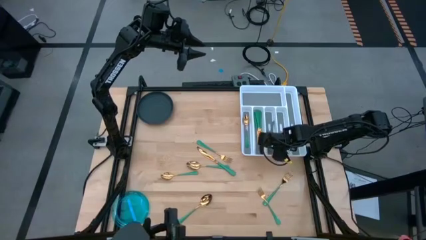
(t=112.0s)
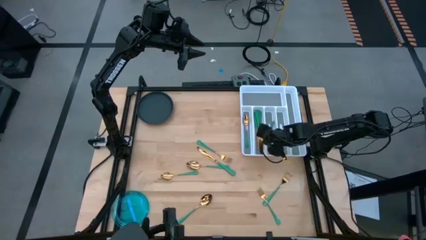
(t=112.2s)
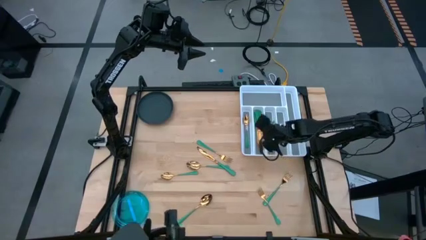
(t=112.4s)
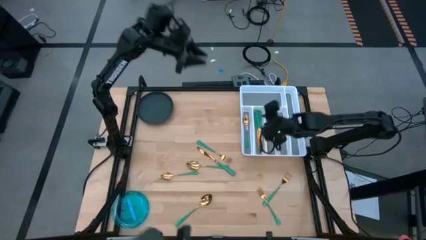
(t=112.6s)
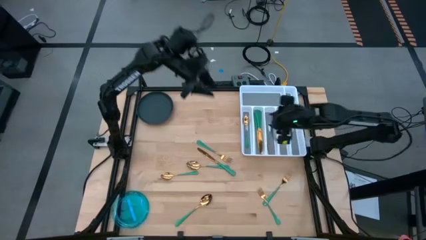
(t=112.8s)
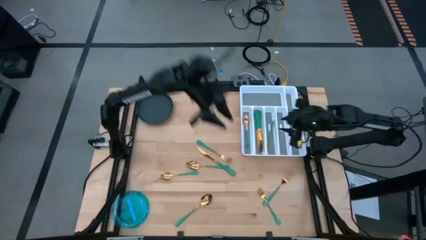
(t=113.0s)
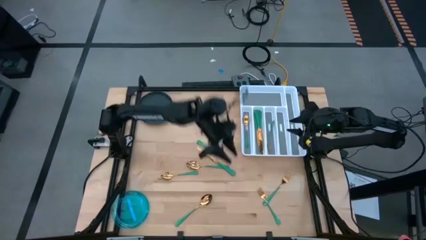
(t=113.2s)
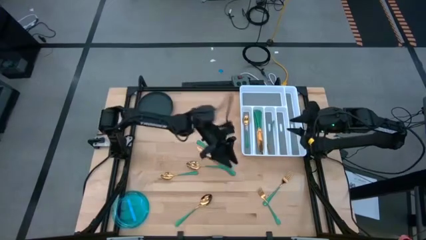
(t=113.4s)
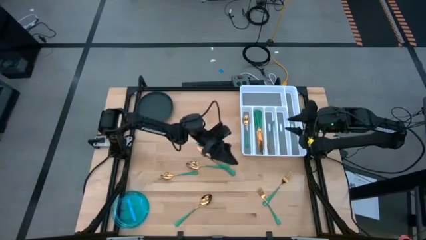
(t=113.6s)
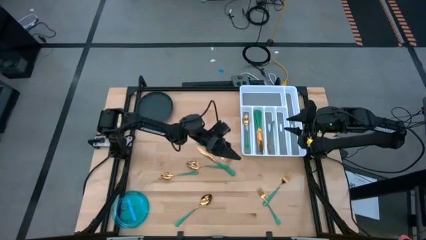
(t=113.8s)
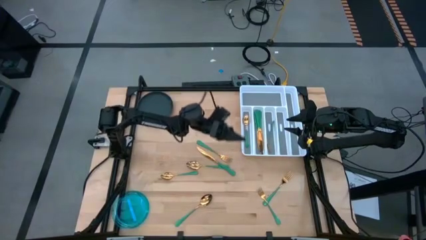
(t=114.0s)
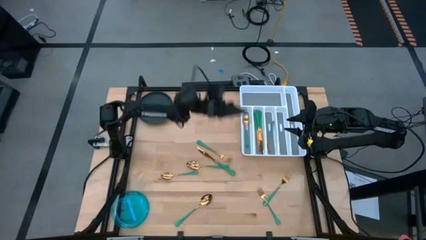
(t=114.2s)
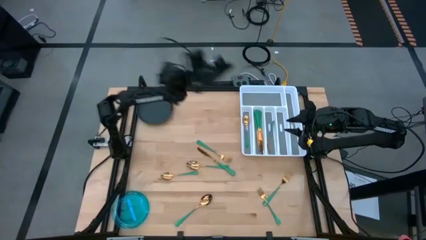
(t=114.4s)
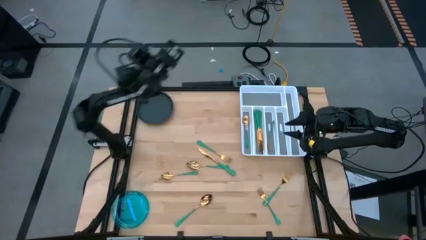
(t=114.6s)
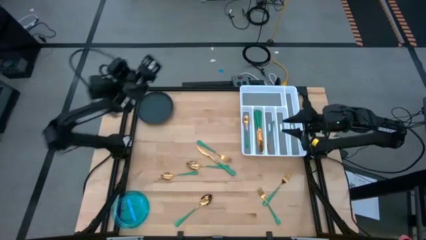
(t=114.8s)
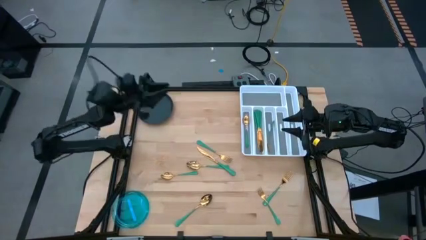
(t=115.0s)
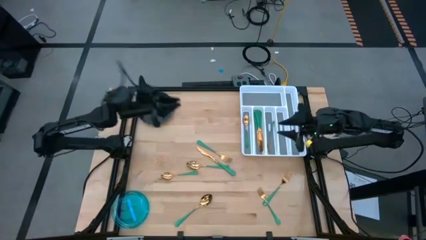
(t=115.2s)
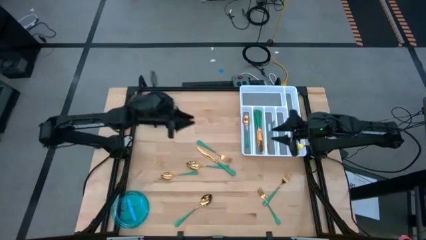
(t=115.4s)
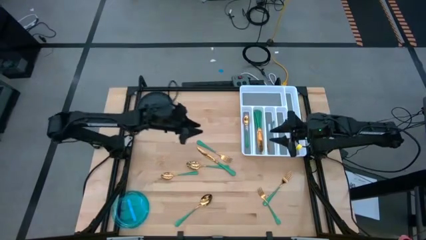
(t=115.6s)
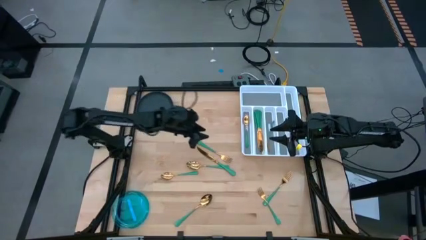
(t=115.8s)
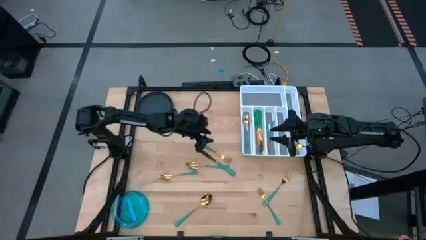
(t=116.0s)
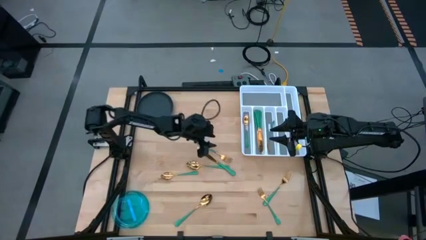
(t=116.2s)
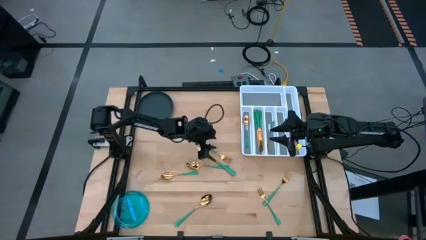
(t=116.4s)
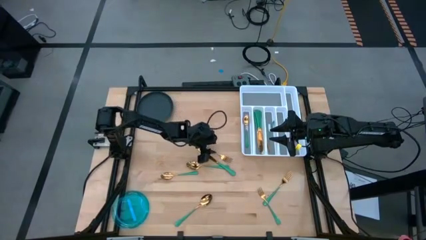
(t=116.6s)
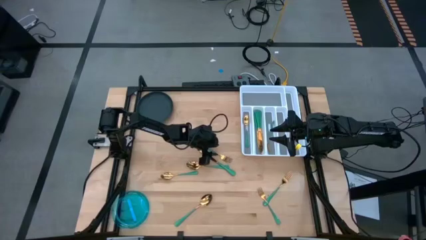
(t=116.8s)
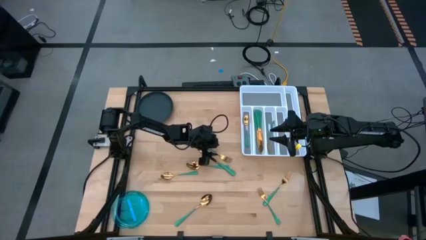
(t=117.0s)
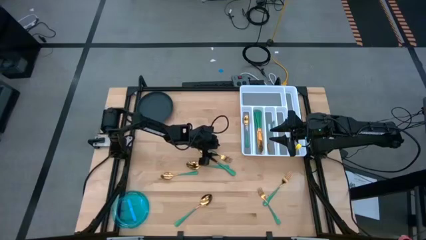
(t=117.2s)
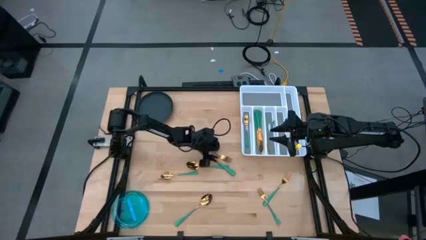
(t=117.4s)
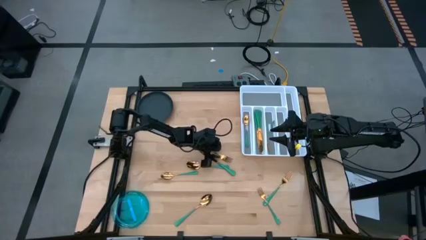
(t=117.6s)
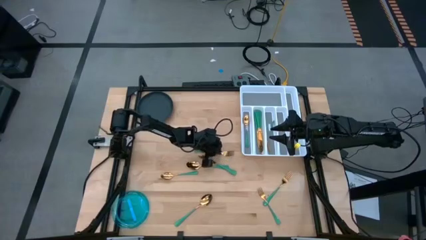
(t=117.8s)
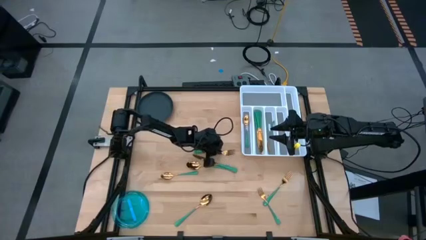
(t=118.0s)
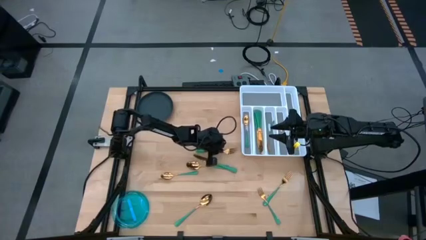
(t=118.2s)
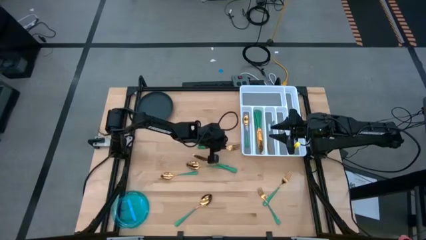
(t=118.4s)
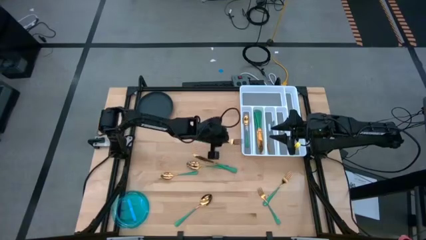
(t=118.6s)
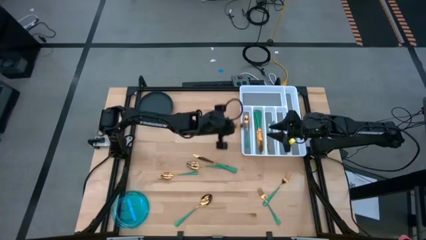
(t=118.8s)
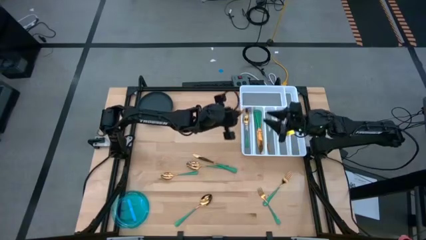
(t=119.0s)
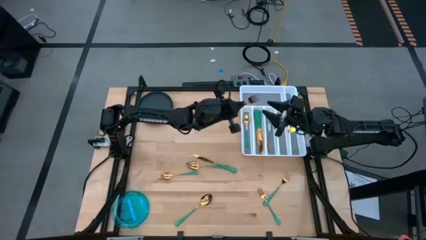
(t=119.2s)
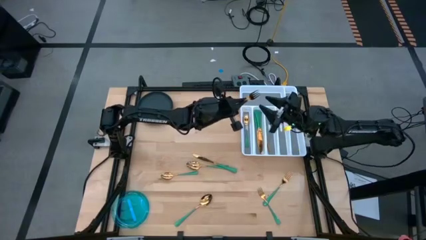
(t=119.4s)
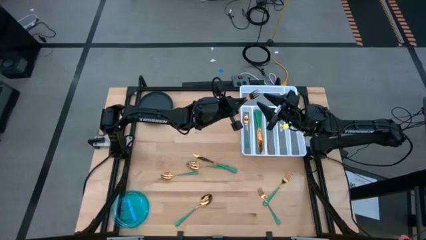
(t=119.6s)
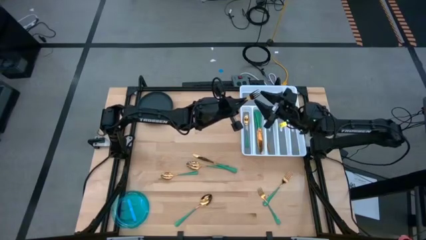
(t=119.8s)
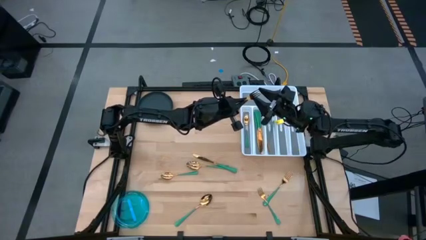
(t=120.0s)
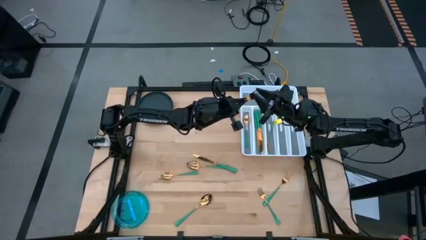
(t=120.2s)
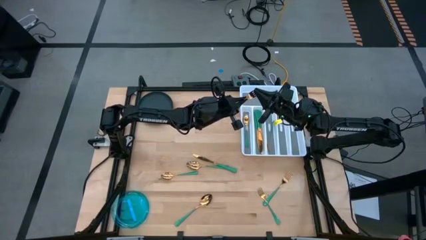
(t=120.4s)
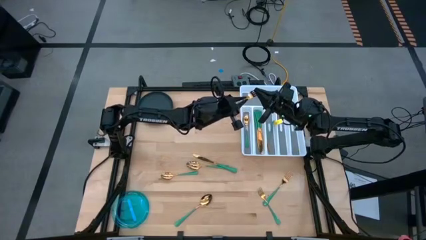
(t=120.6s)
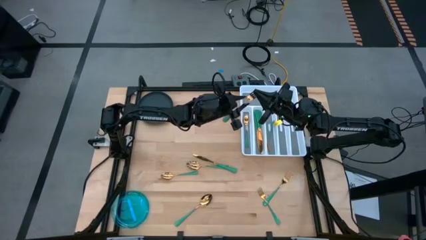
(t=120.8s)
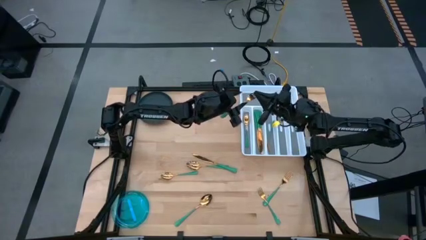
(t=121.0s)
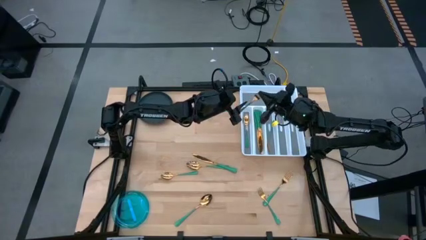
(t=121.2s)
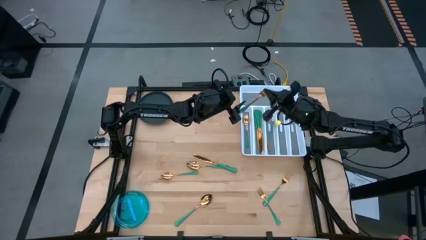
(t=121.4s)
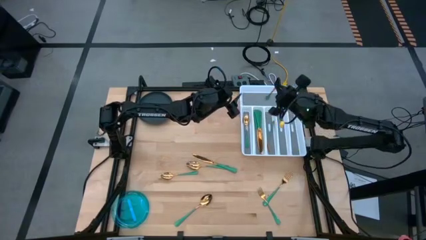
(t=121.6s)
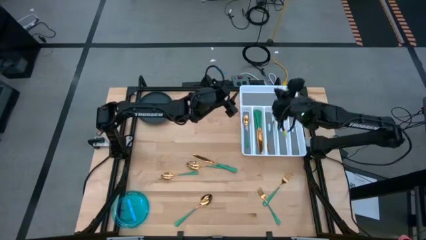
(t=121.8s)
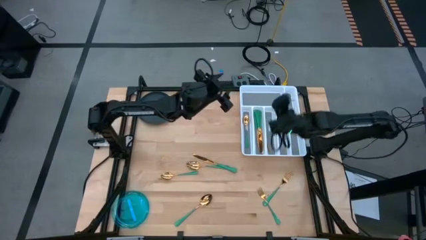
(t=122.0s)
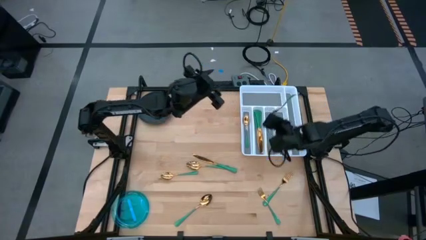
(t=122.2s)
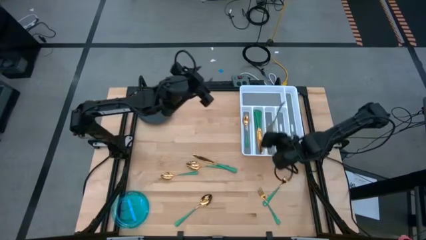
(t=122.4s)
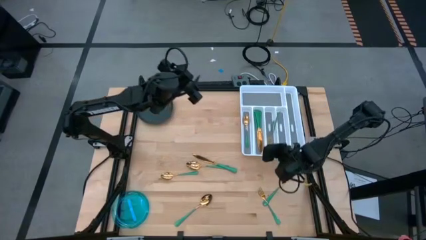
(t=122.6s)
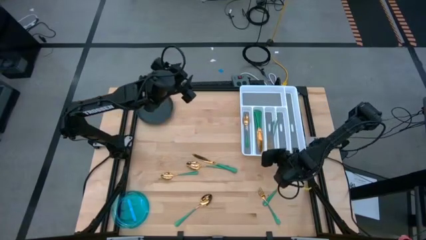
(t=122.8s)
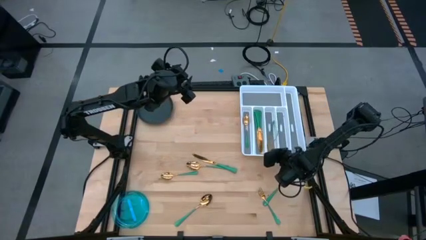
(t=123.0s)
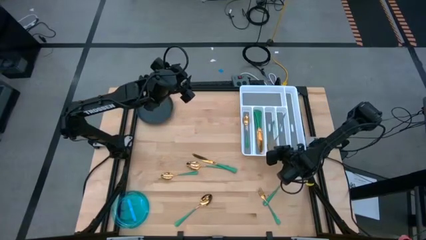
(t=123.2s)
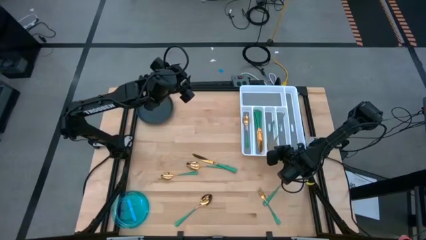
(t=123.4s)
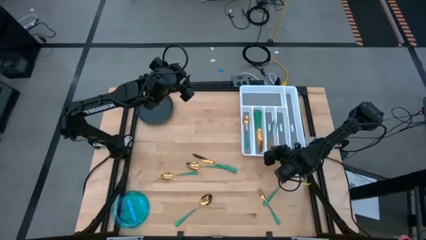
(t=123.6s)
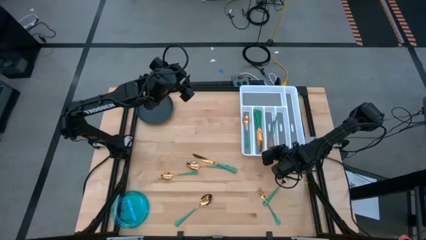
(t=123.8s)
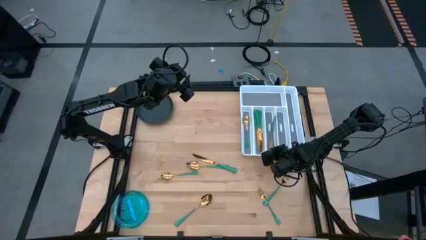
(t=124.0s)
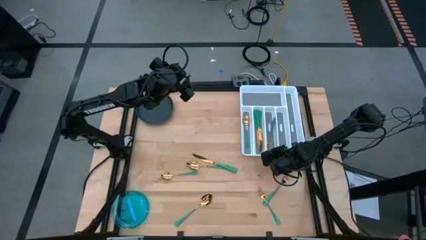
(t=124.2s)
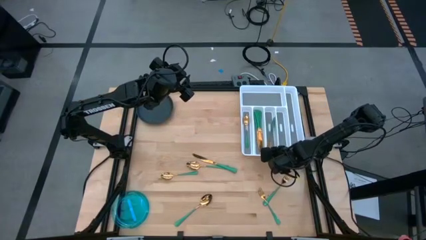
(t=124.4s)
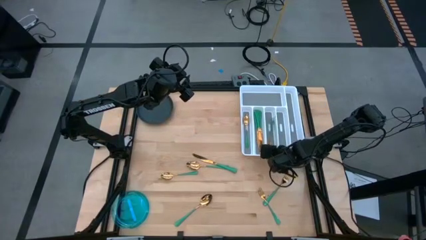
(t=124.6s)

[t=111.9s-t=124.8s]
Task: Sort silverware
Put the green fork into the silverware tray
